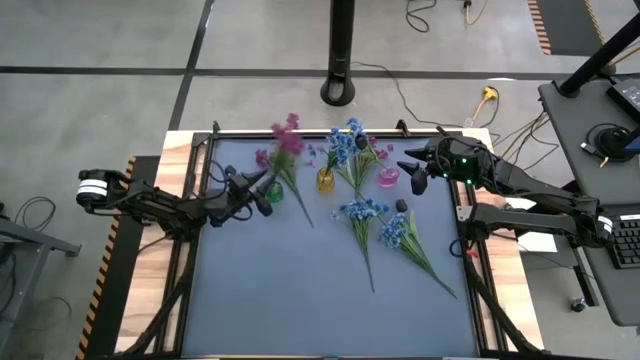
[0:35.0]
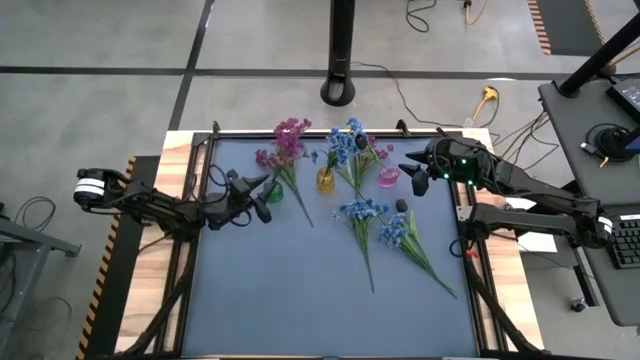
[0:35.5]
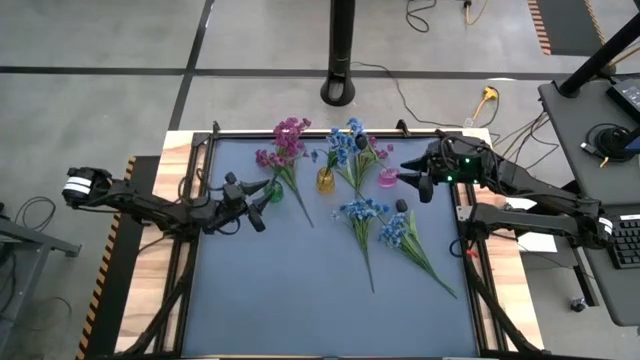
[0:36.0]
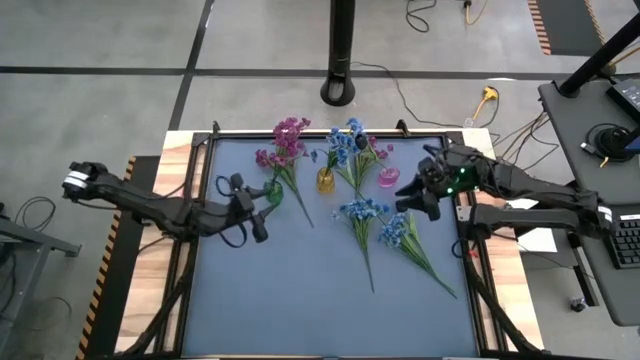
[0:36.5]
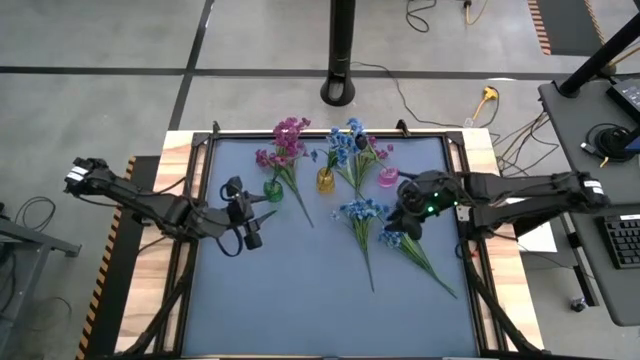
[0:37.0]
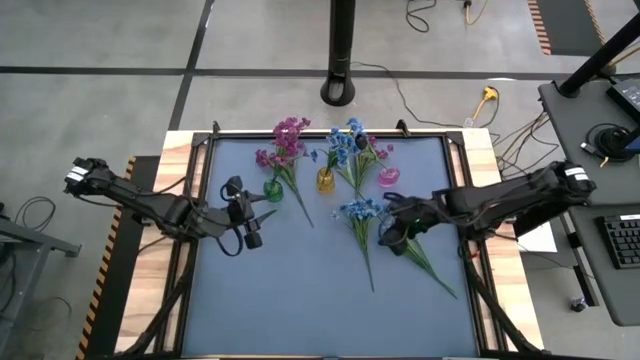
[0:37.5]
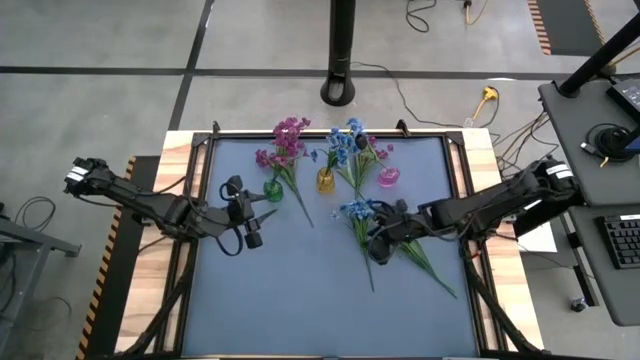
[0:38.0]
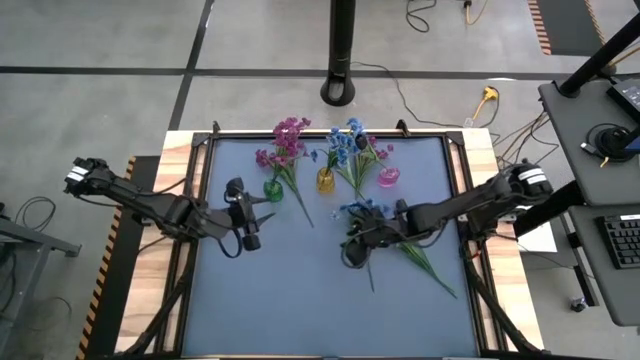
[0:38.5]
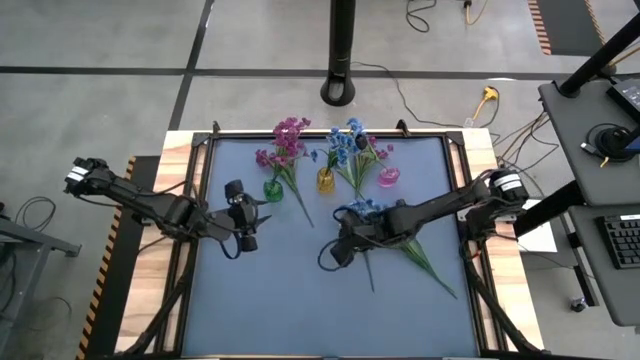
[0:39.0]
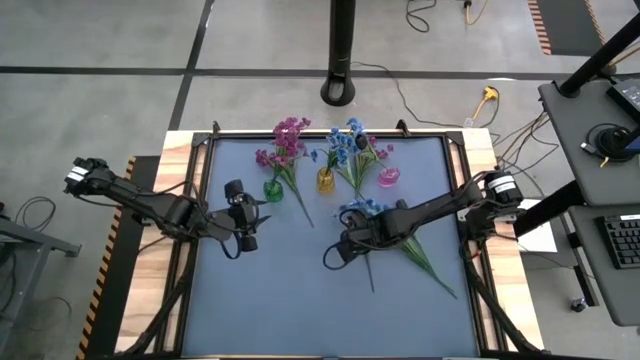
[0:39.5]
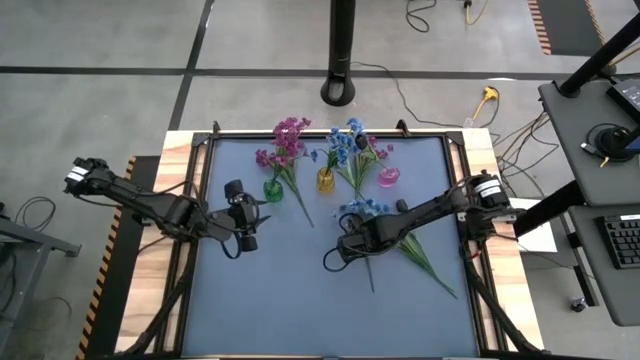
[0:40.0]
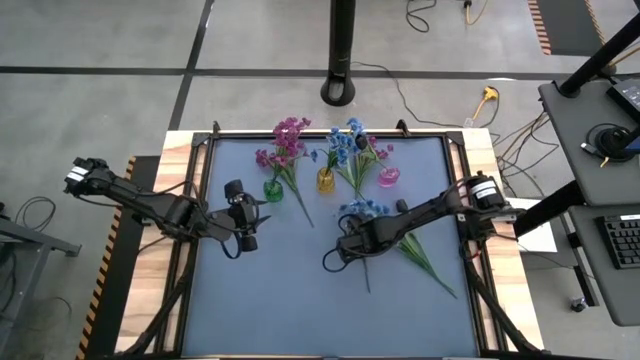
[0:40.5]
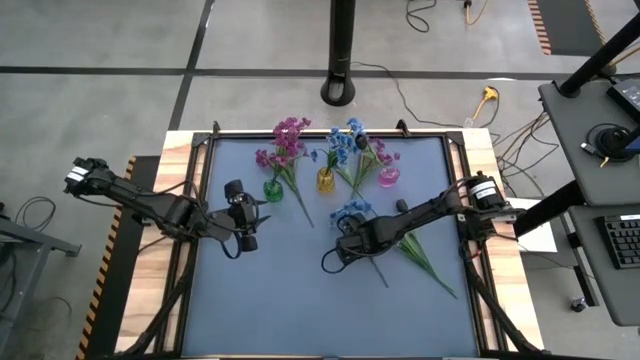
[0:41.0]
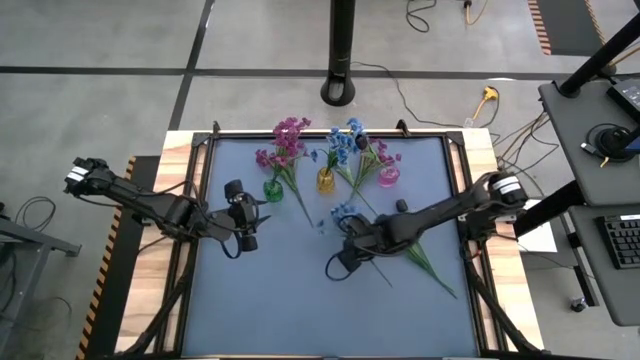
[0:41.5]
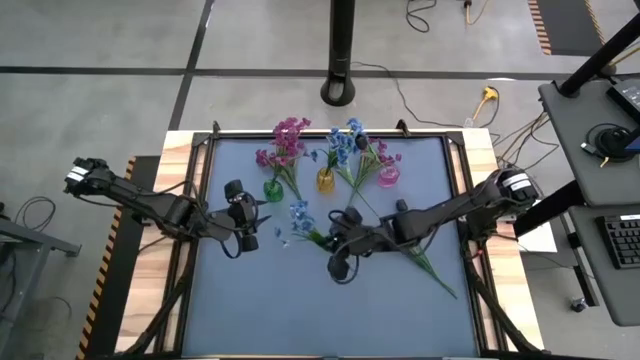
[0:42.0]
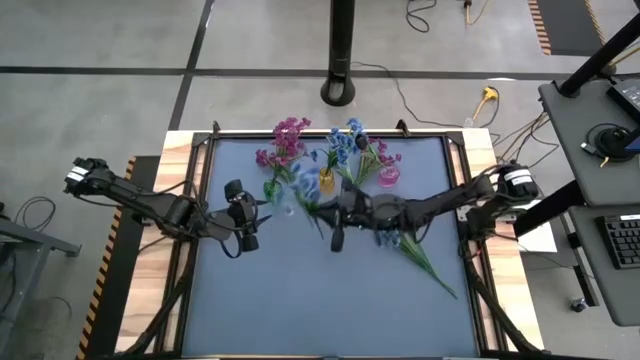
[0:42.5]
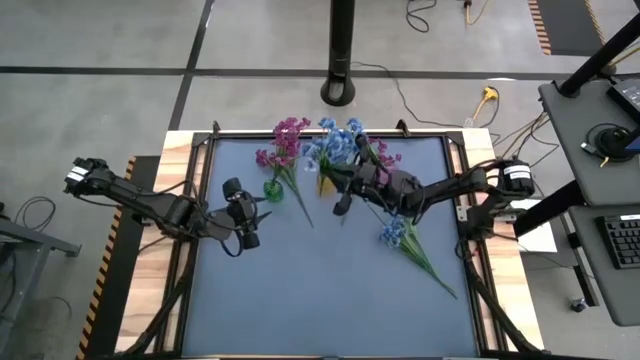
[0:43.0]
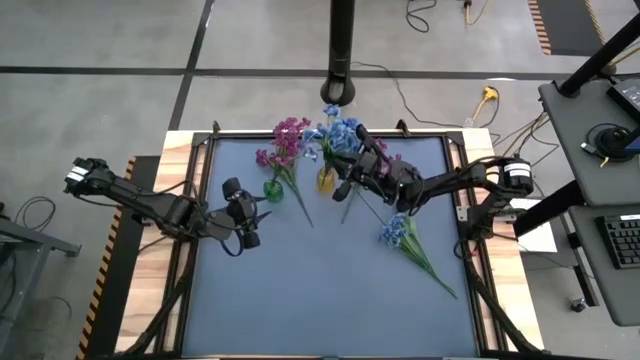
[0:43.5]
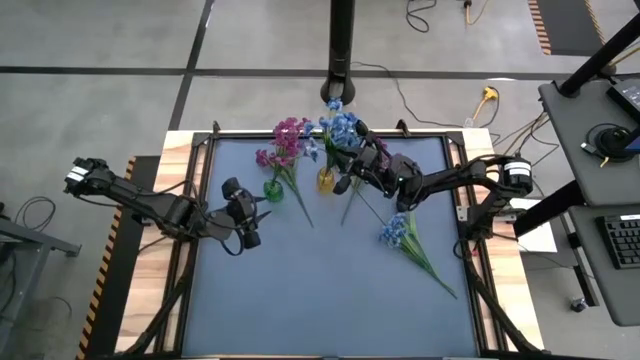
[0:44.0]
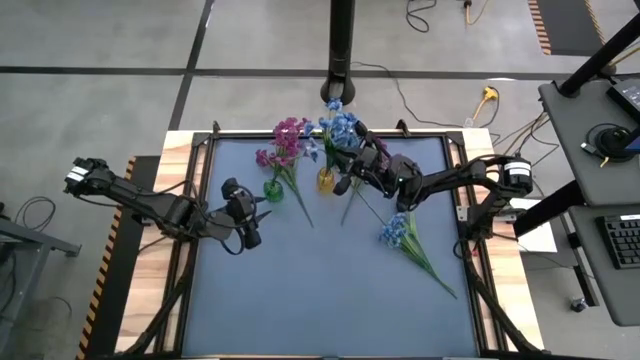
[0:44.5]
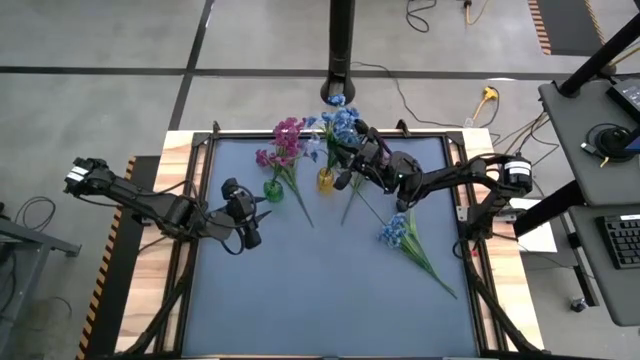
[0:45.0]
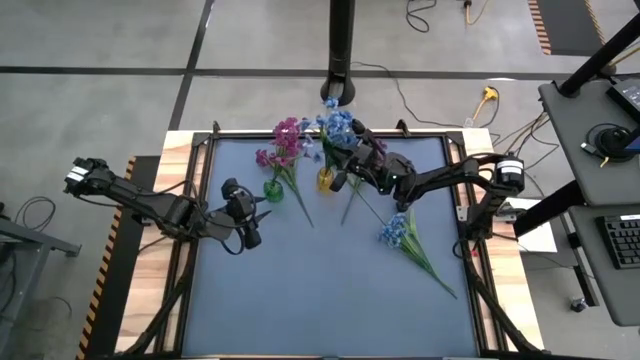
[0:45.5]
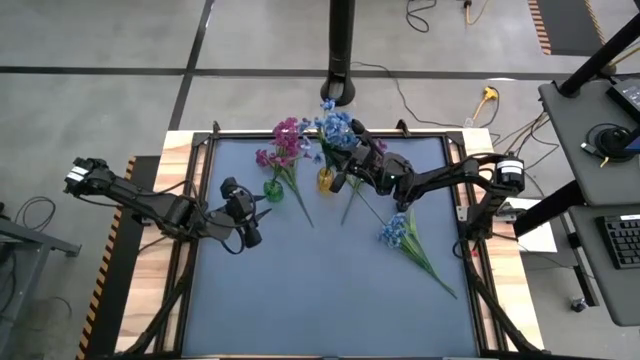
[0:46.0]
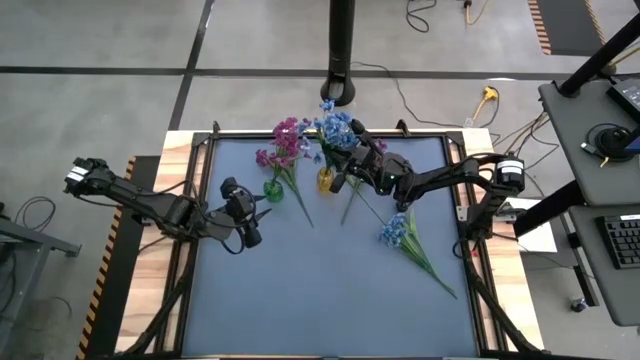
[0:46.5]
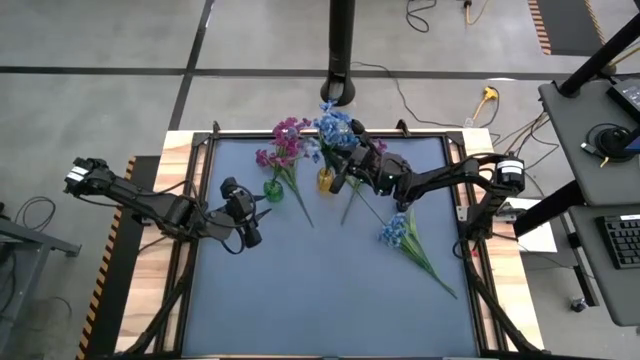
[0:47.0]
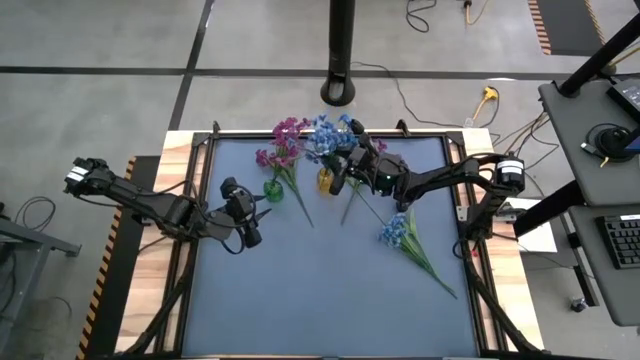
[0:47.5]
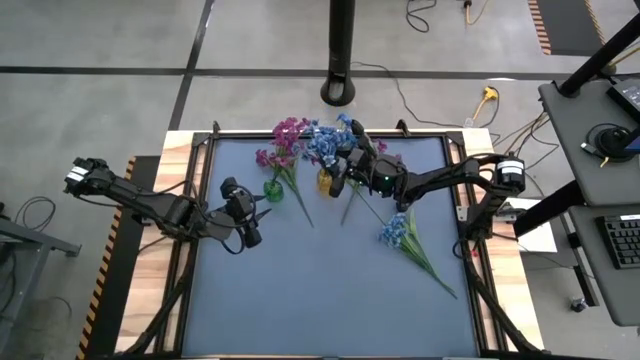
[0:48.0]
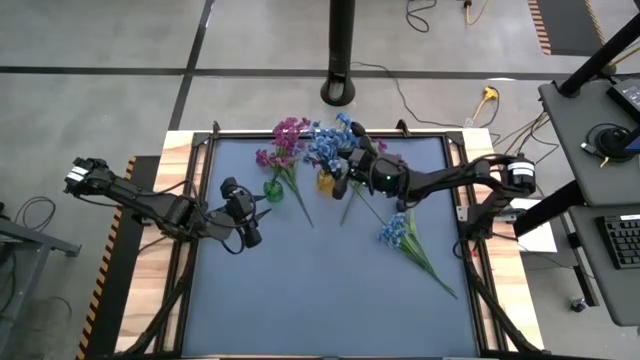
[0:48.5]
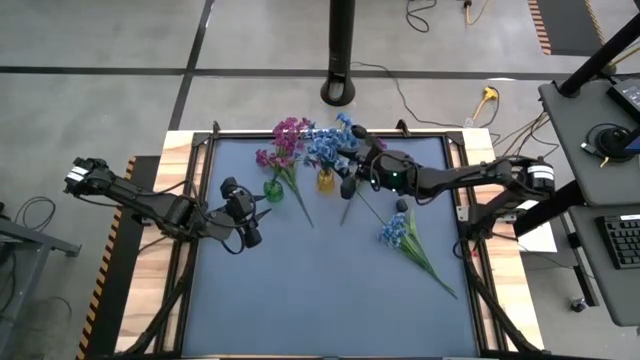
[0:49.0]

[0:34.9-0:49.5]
Task: Sort flowers into vase by color
Put the left blue flowers into the yellow flower vase
